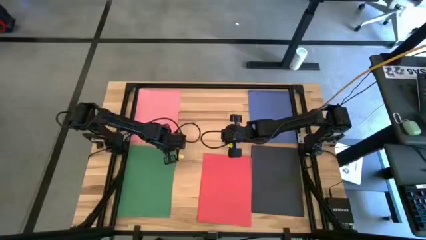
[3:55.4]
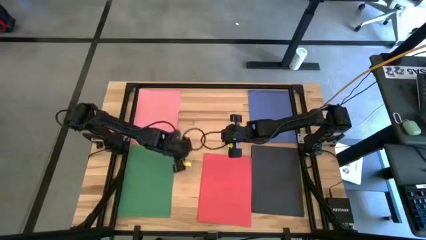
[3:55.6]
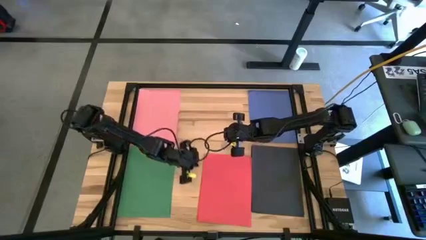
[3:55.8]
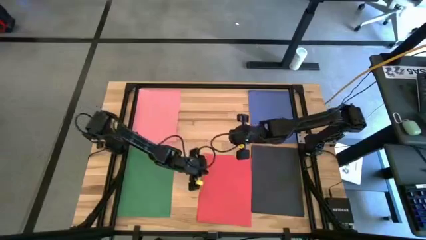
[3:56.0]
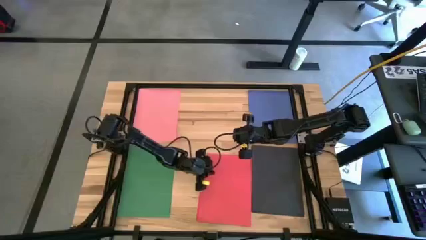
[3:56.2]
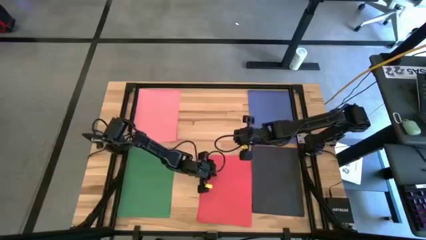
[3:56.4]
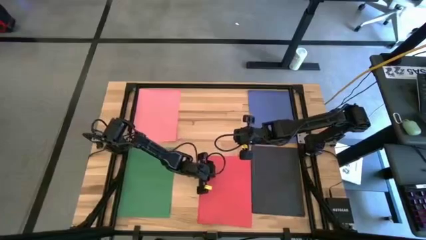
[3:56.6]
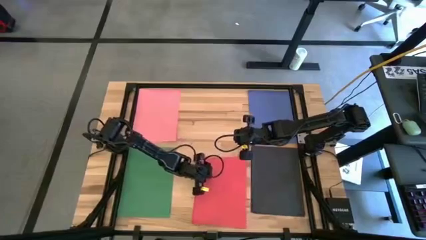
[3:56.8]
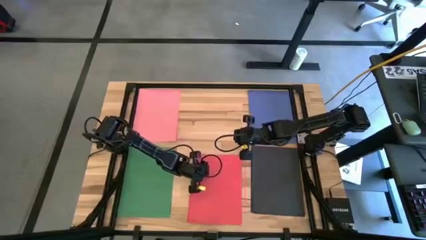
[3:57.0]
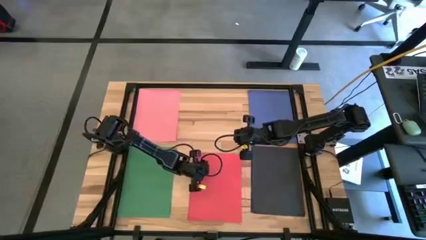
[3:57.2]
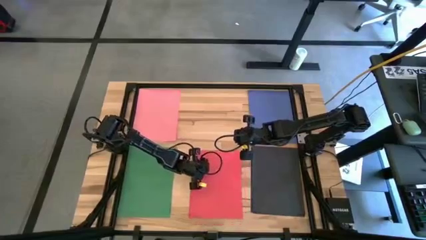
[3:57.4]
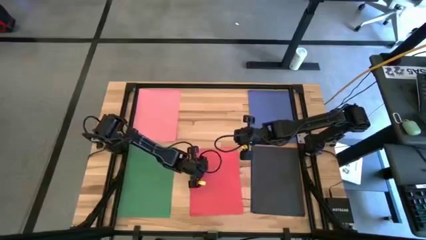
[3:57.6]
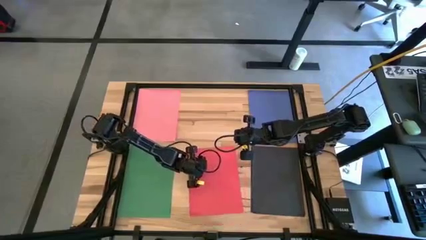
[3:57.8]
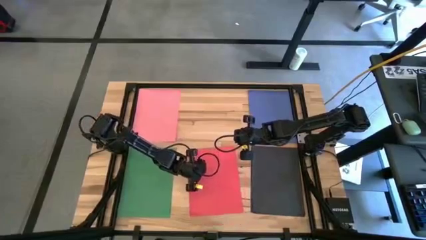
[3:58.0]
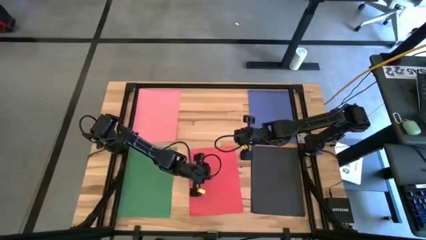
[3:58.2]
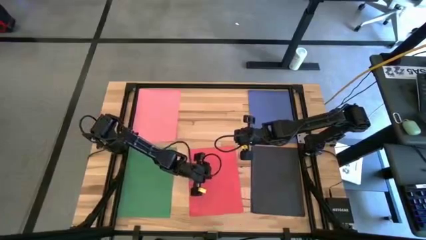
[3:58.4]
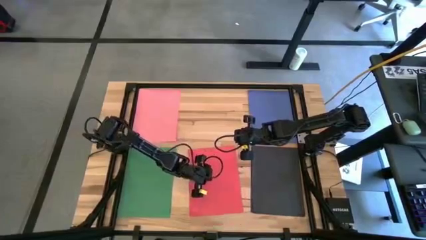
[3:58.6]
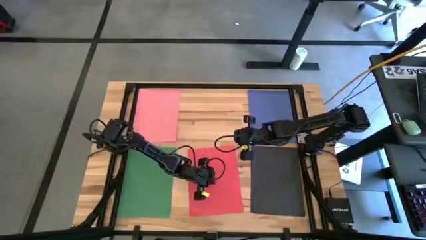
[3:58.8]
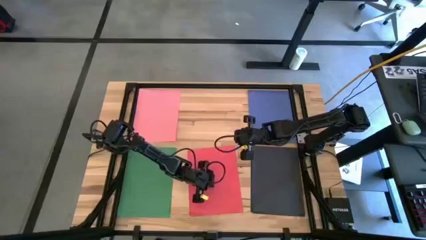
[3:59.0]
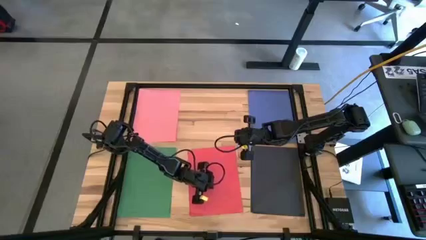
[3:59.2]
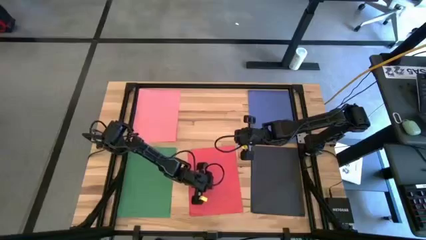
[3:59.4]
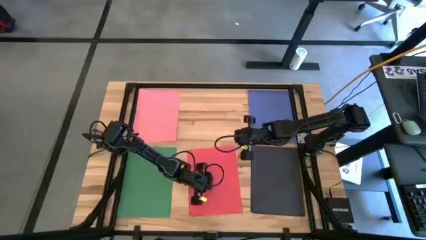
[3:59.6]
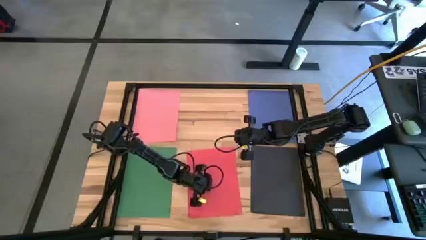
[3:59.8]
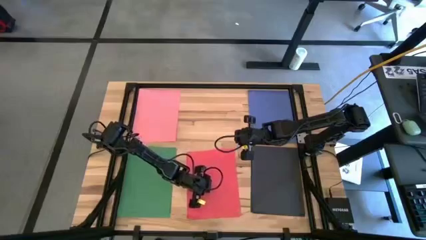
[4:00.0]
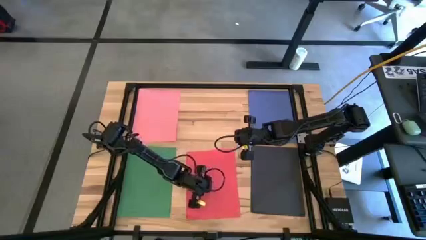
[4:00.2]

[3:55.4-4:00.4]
Task: Organize paper
Adjust the stacked red papers on the table

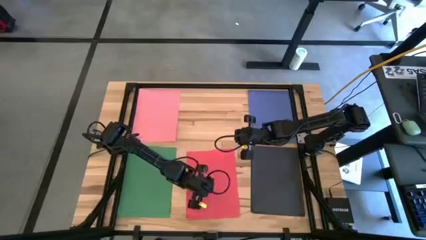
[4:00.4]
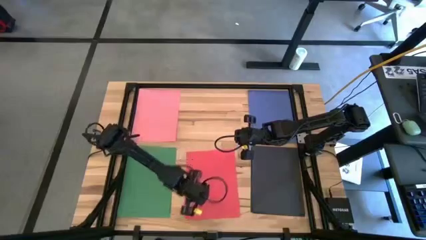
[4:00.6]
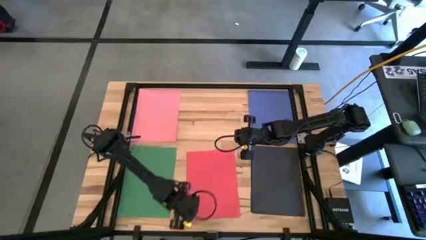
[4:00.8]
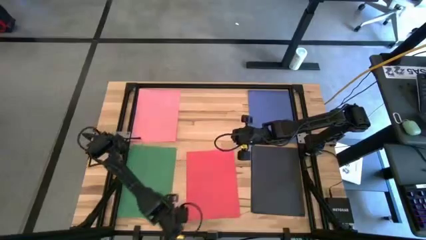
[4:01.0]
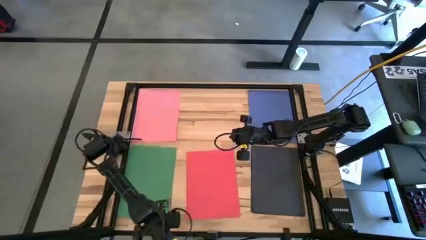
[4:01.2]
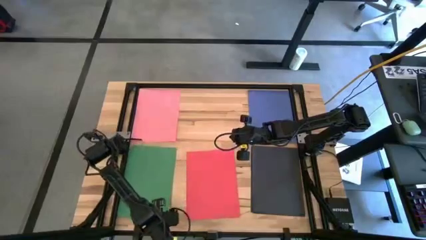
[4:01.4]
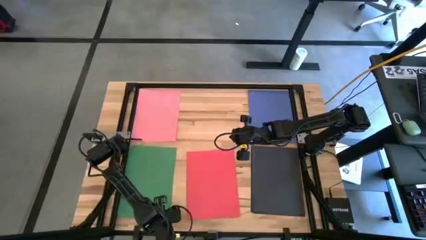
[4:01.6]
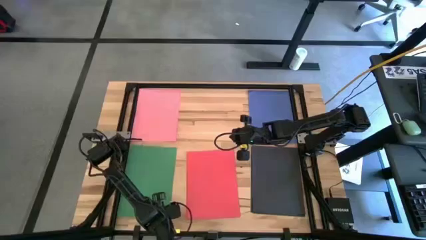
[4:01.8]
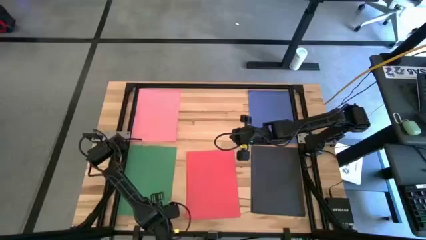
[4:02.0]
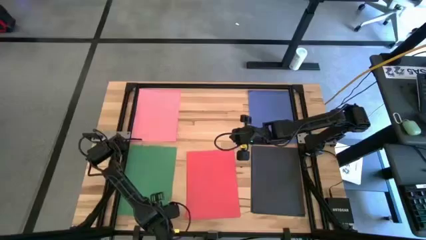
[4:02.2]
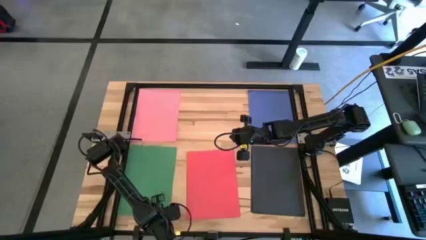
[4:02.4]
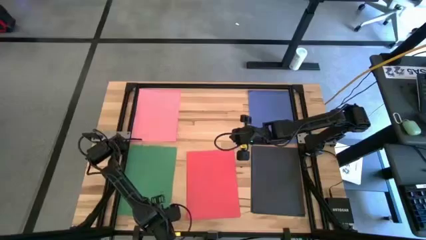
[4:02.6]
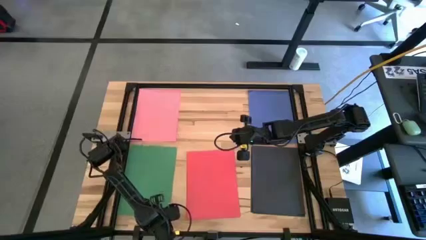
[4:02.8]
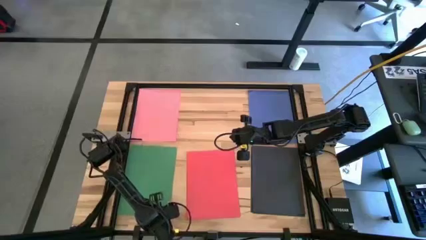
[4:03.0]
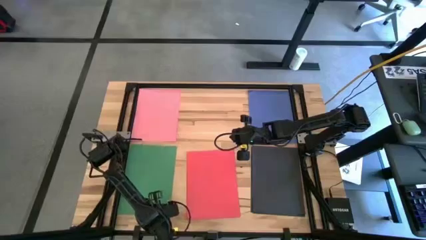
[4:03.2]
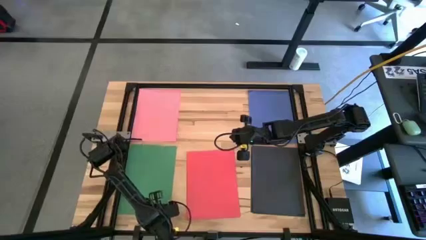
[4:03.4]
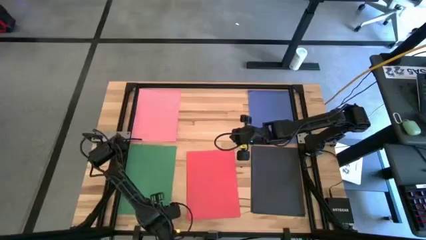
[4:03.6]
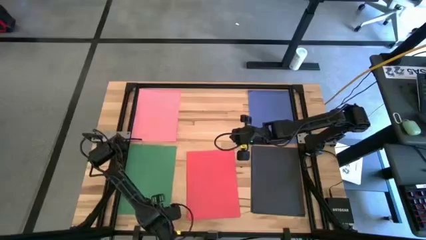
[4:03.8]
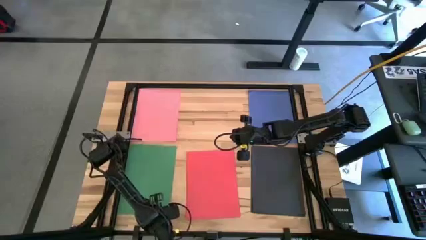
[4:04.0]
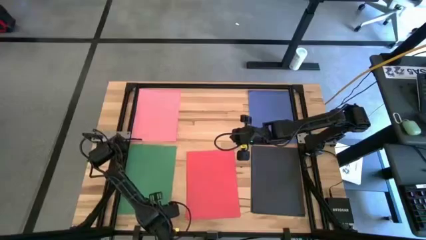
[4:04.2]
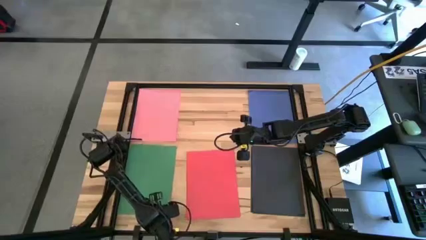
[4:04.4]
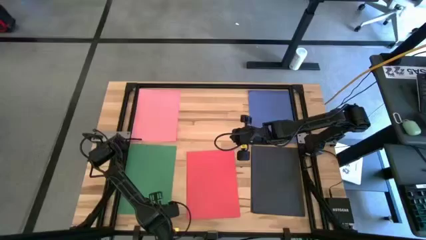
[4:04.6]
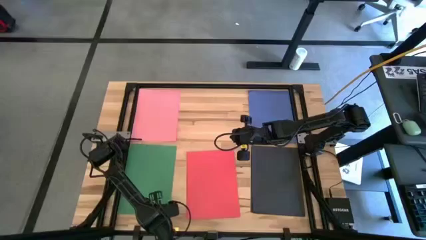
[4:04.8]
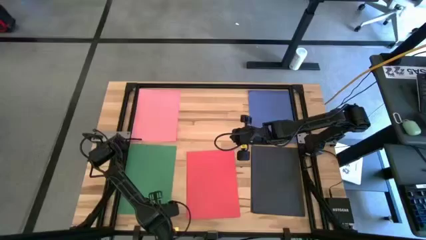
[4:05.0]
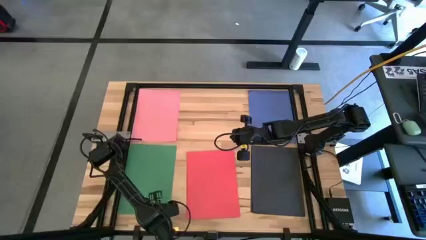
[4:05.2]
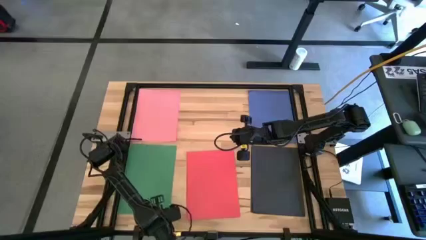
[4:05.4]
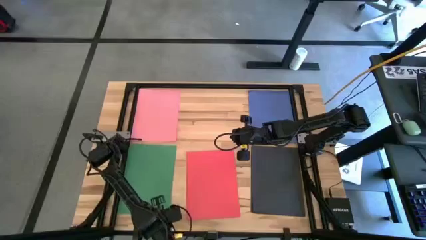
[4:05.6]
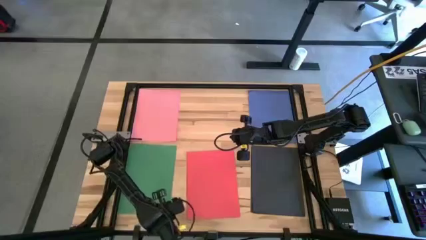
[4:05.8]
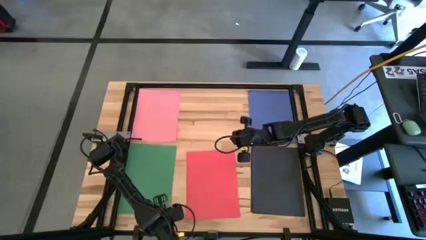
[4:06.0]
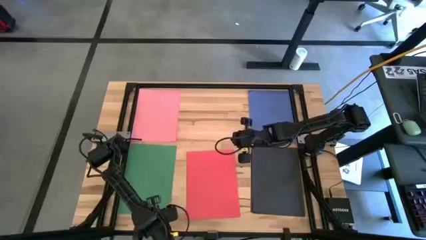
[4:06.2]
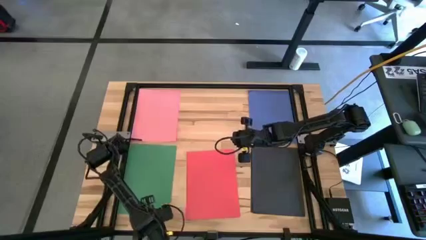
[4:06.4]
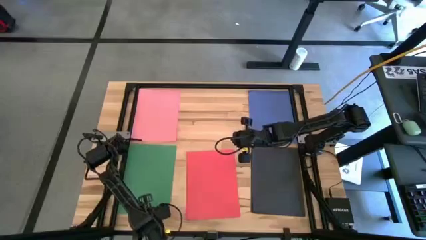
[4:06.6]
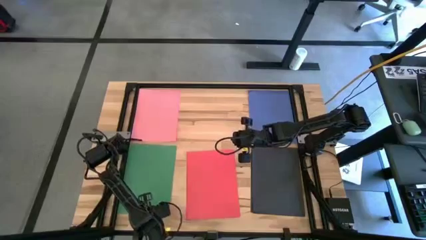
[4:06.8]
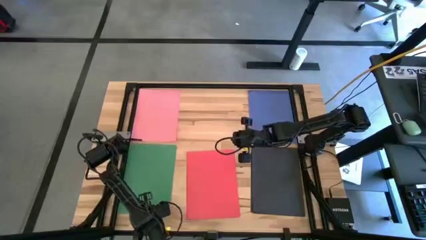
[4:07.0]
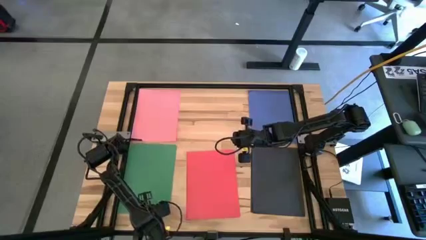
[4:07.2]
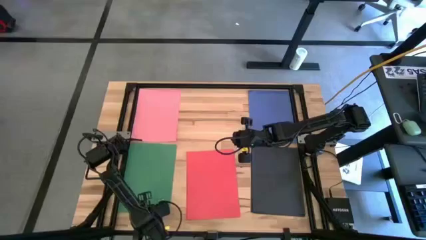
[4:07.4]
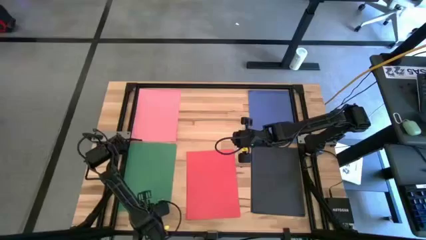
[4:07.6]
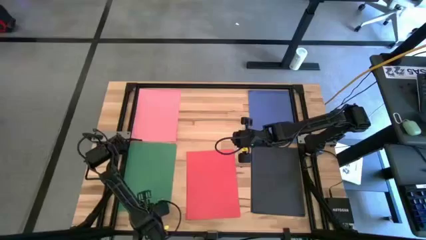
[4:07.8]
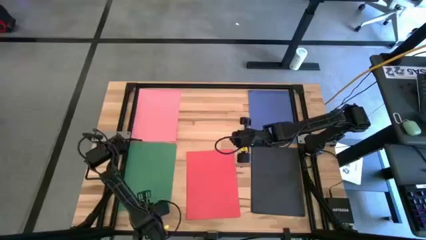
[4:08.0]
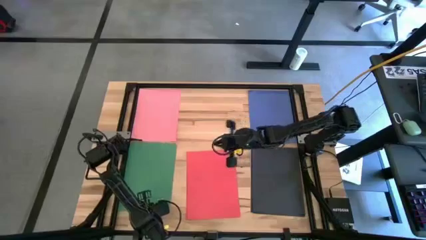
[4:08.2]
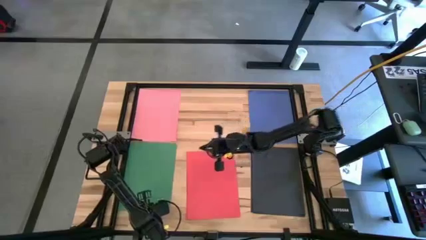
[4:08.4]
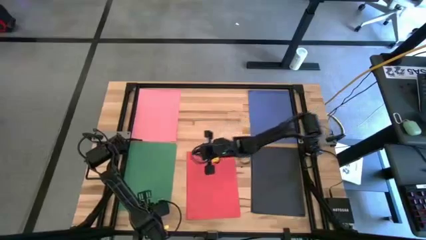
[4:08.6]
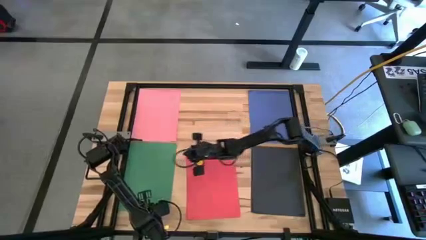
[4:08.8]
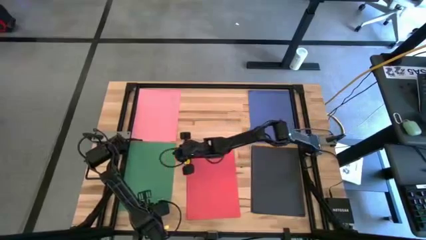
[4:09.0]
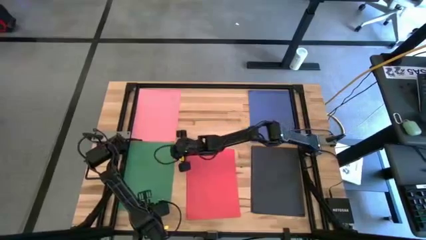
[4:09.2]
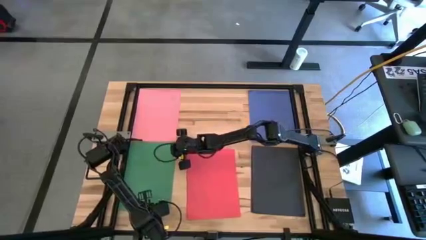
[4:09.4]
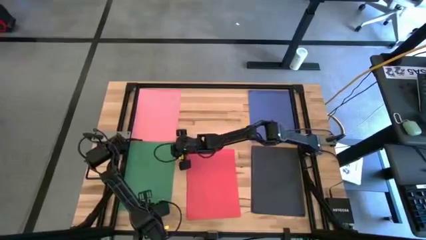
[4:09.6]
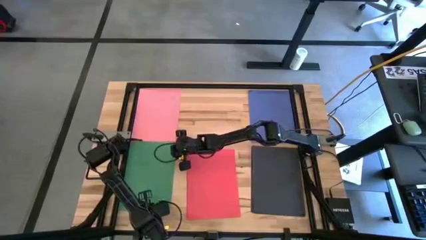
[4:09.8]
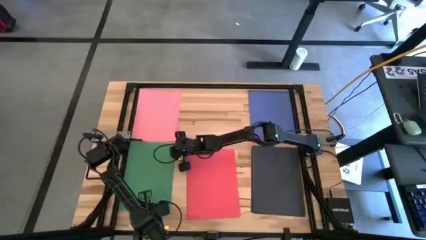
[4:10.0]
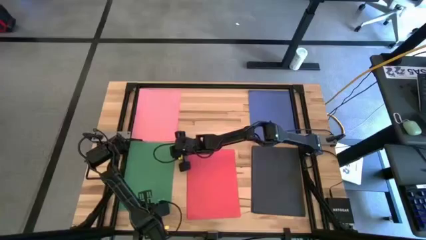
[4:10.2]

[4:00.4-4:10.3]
Adjust the stacked green papers on the table

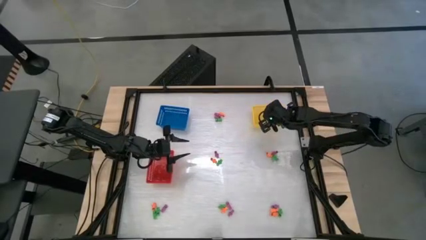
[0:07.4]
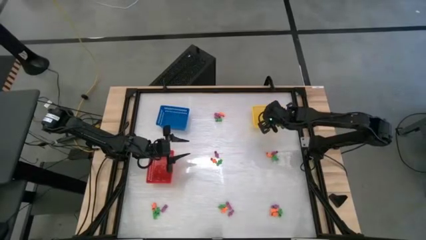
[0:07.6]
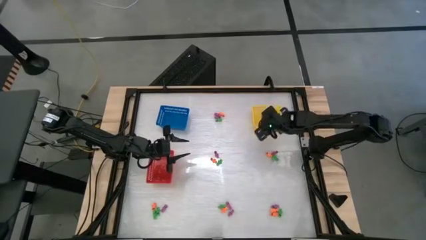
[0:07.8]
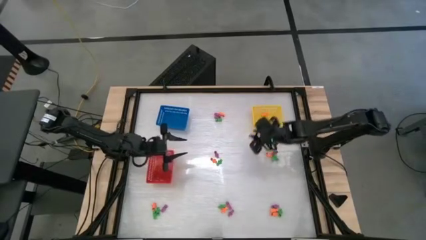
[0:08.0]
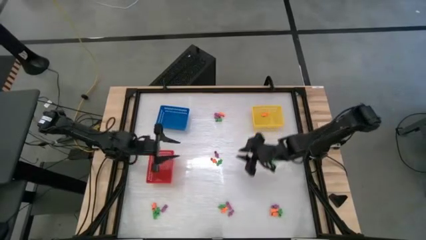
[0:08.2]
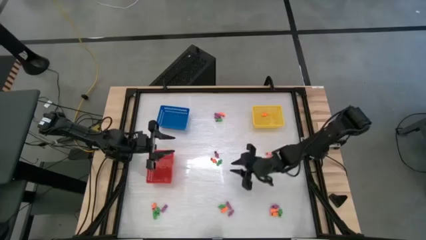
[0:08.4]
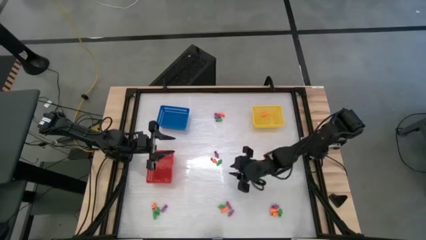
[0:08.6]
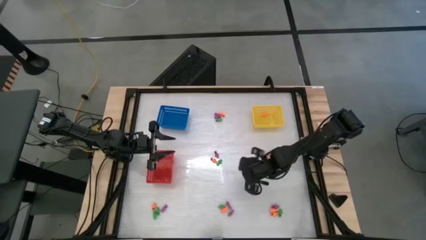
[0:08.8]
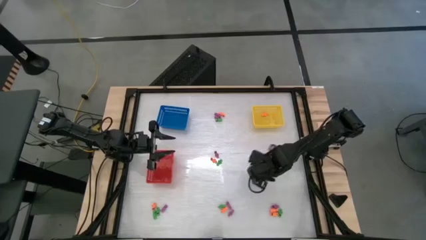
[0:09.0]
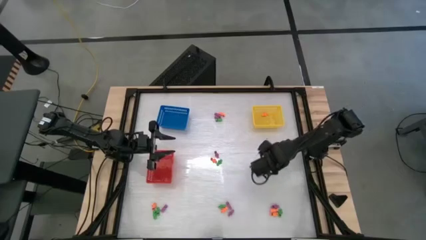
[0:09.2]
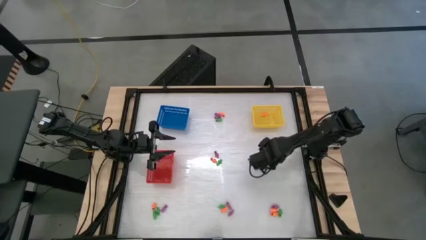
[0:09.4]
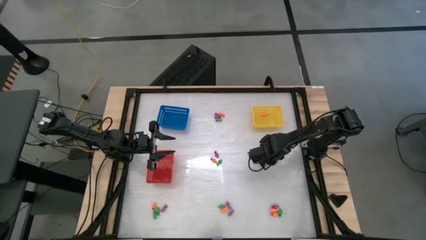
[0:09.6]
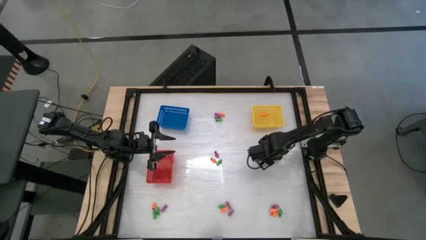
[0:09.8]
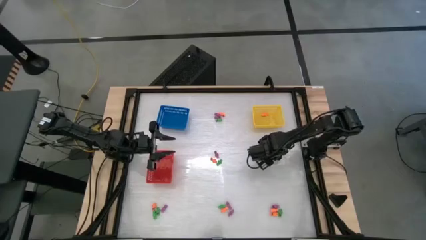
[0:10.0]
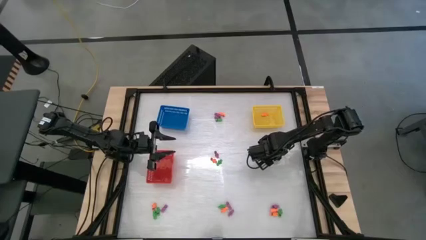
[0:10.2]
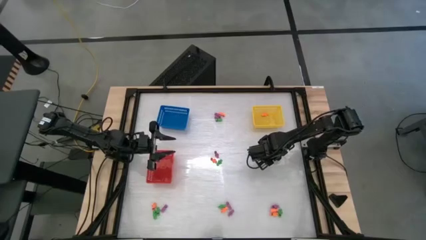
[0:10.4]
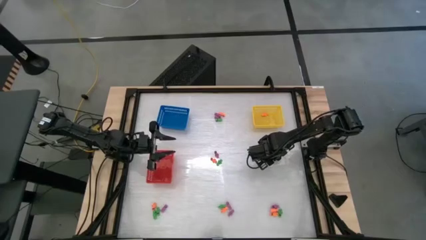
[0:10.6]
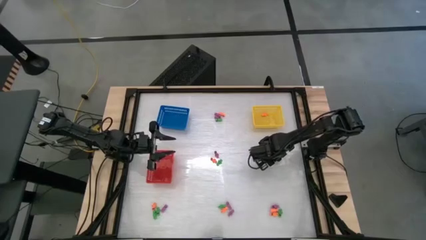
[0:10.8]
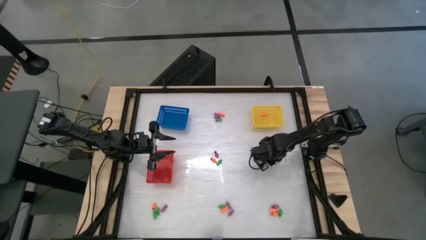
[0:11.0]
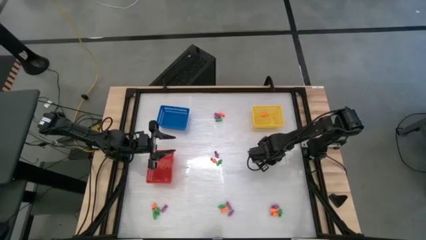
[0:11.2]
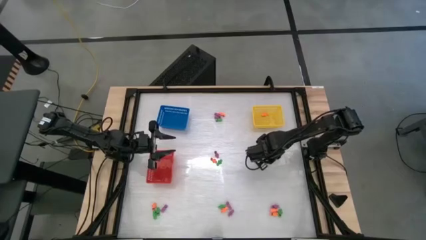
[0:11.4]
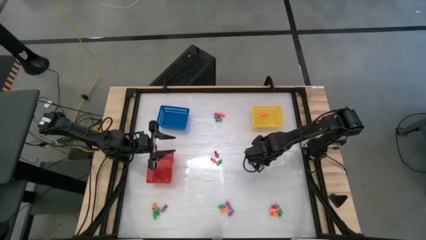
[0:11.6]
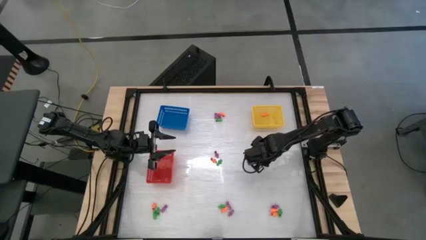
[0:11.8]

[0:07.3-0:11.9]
Task: Sort Halloween decoration
Put the green skeleton toy into the red bin
